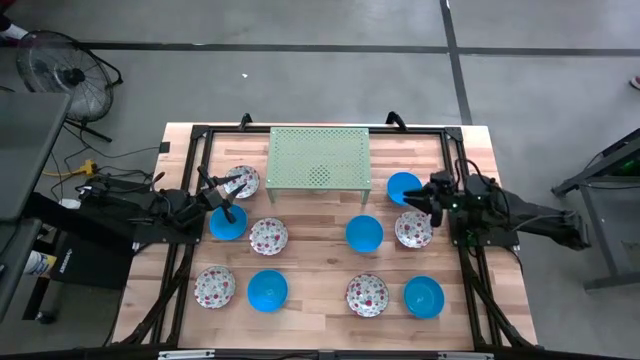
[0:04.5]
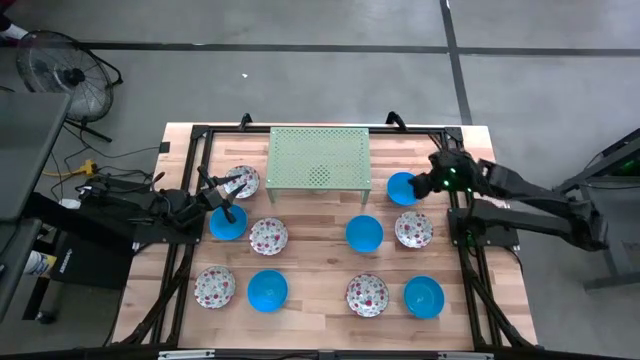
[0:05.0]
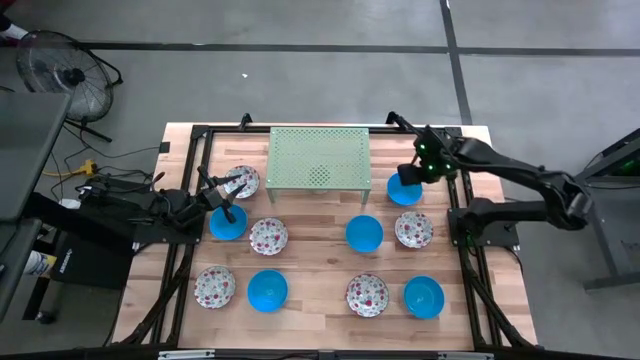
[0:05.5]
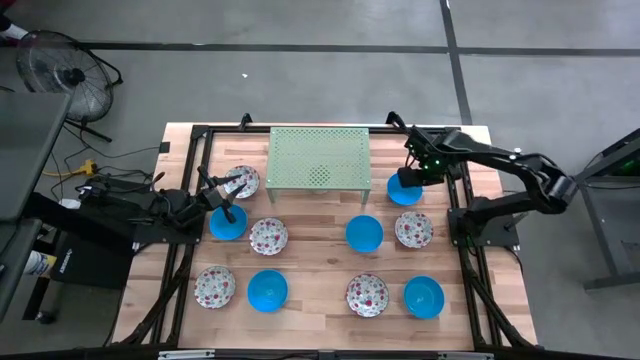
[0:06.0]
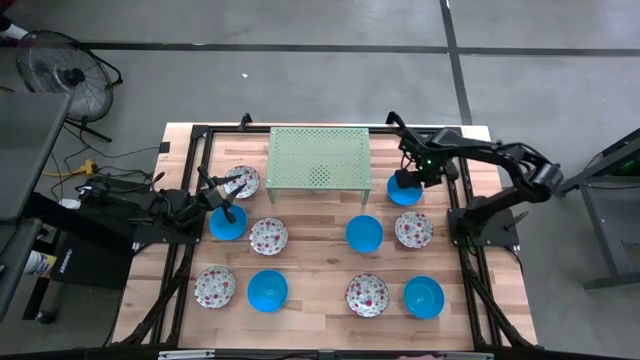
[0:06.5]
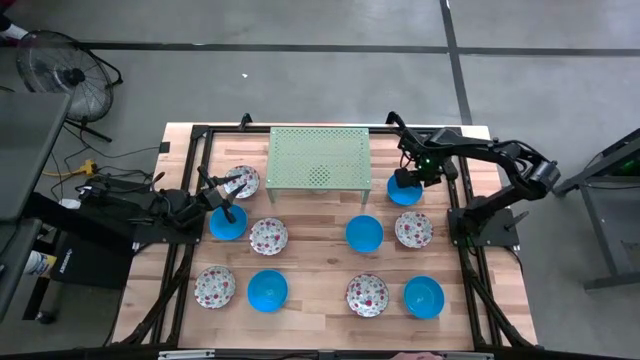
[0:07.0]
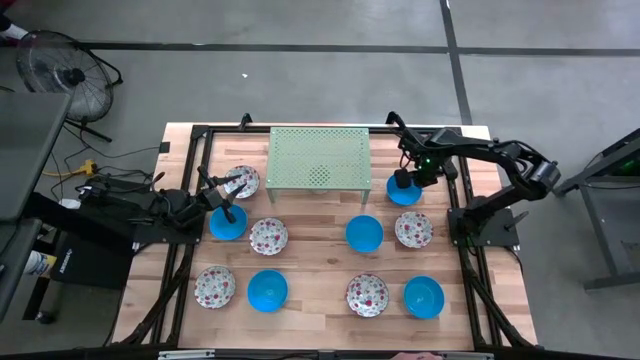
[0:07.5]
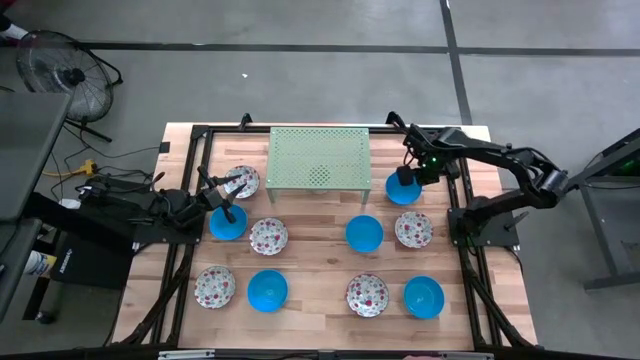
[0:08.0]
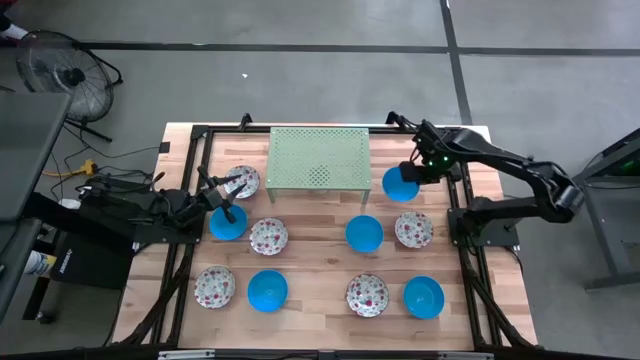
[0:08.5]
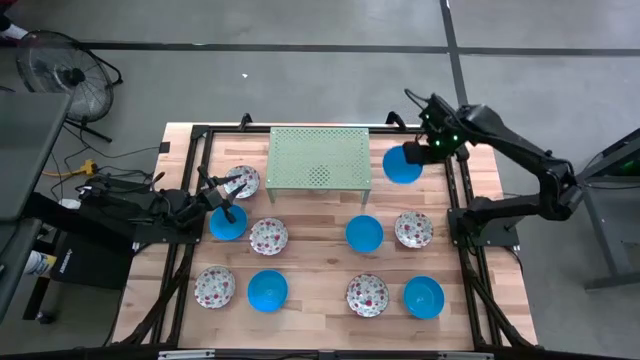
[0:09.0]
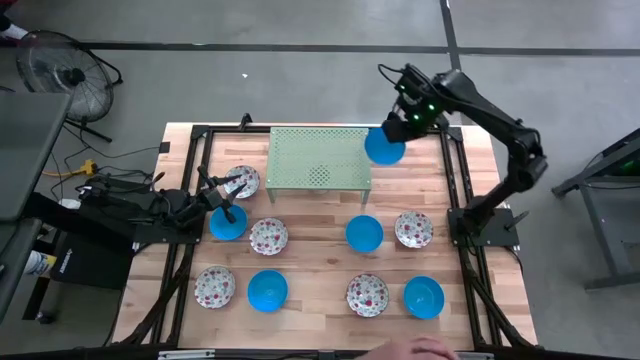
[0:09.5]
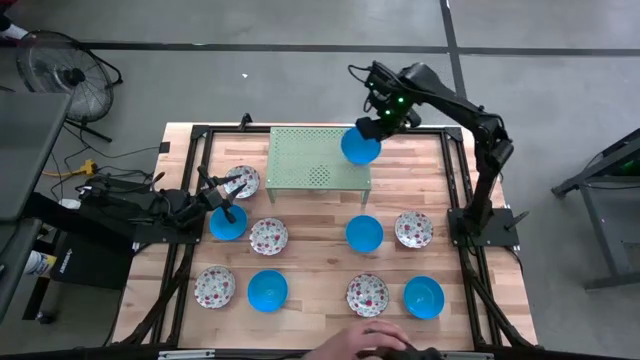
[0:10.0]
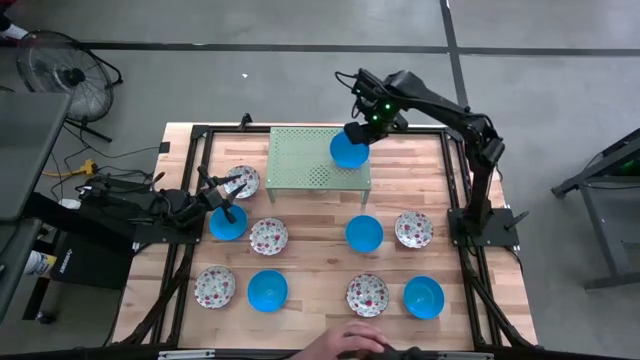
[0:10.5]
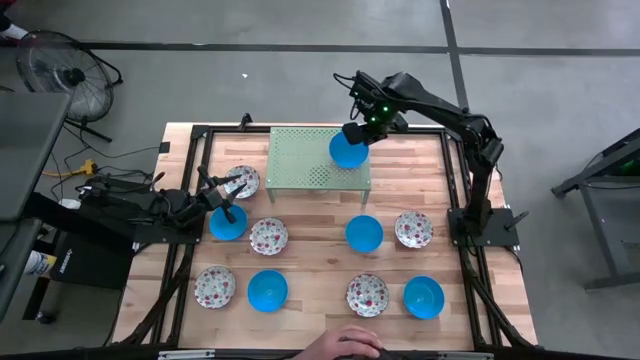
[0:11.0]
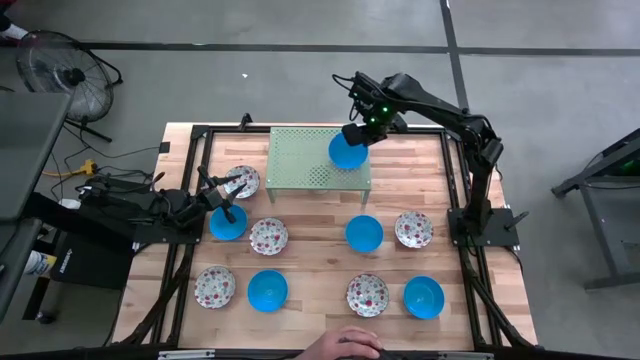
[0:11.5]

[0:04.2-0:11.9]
Task: Pick & Place Mini bowls
Put the blue bowl on the shelf

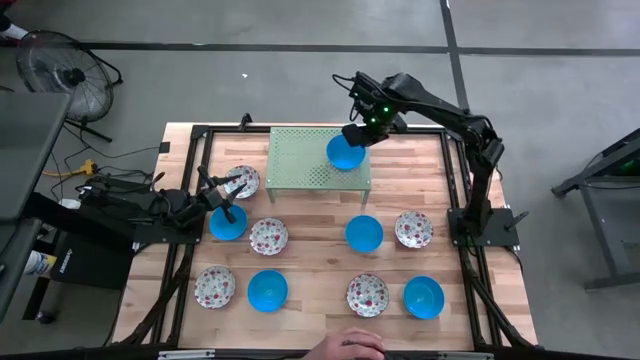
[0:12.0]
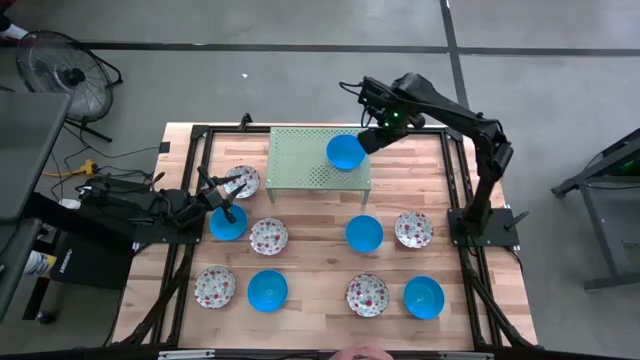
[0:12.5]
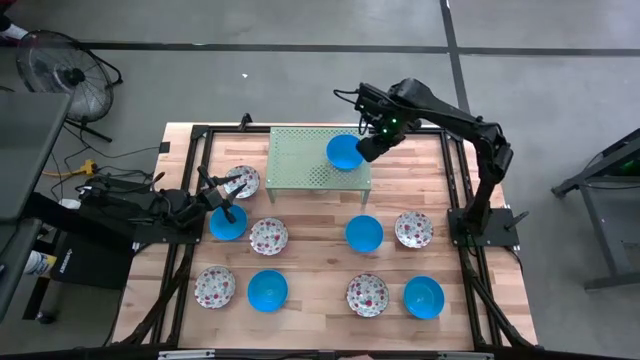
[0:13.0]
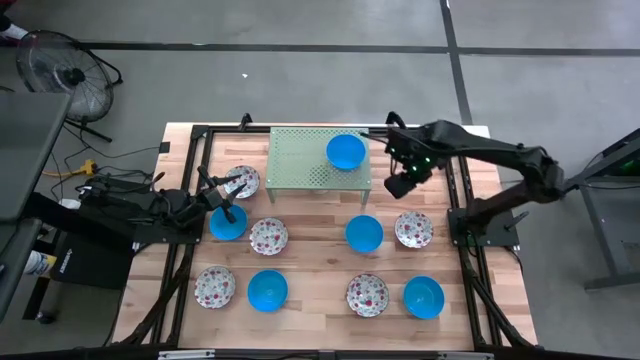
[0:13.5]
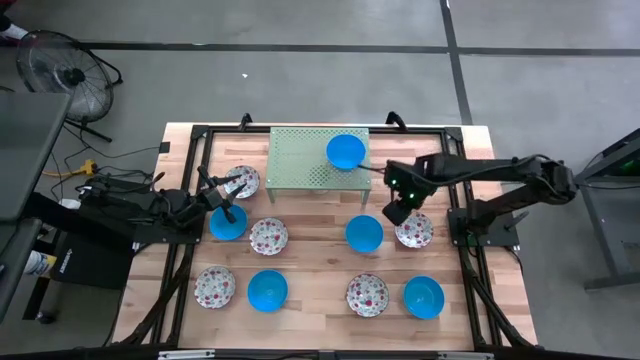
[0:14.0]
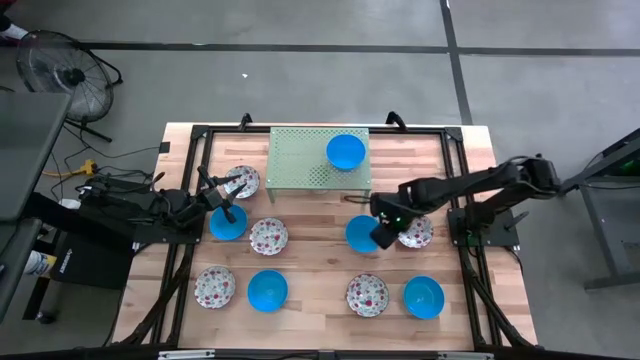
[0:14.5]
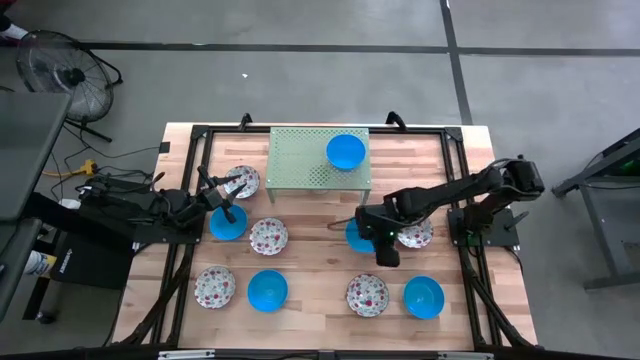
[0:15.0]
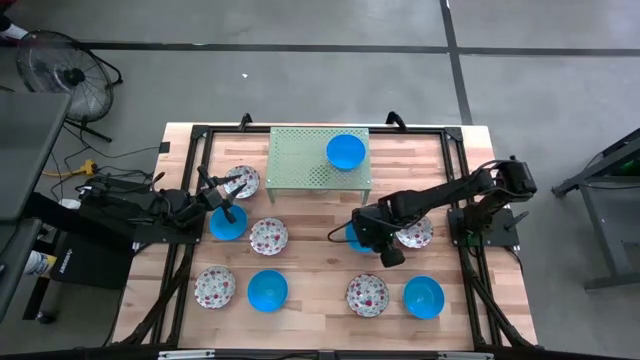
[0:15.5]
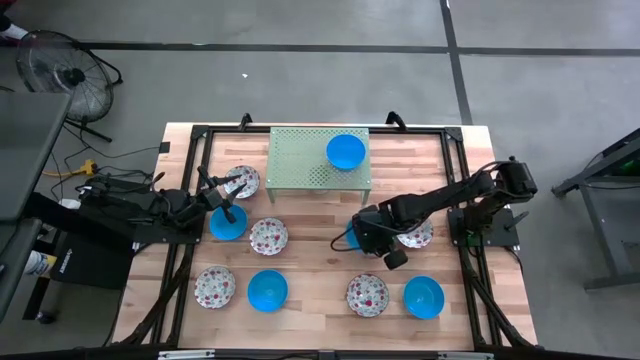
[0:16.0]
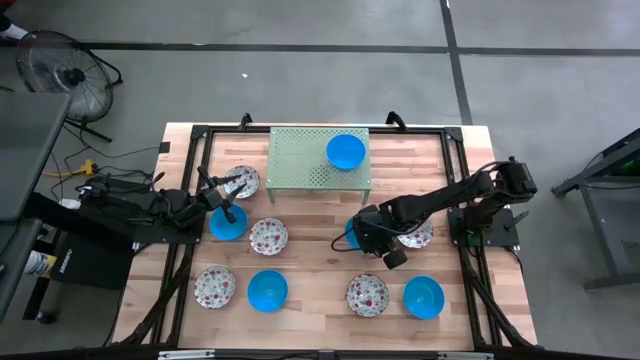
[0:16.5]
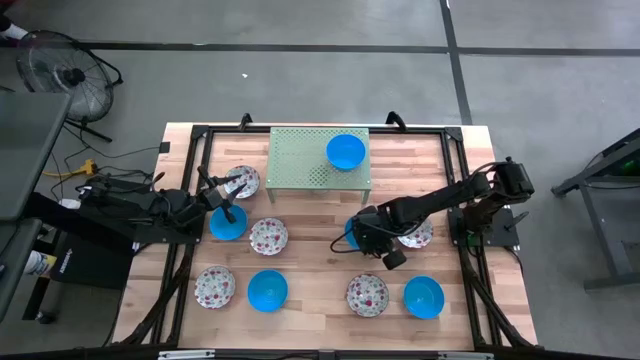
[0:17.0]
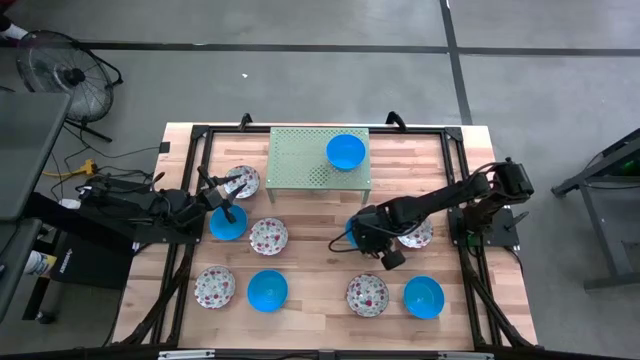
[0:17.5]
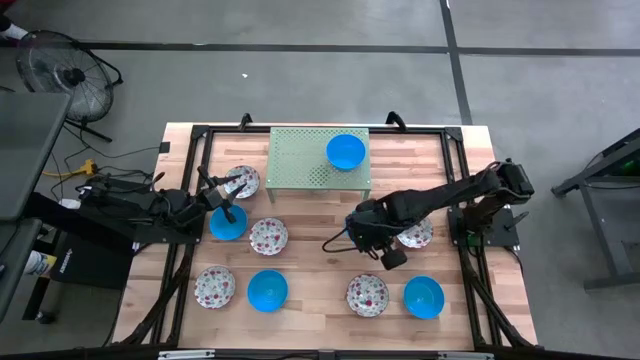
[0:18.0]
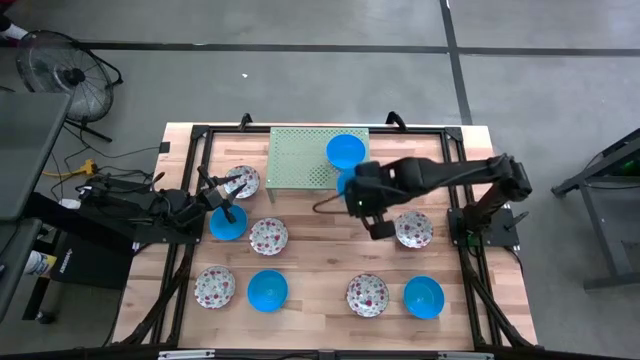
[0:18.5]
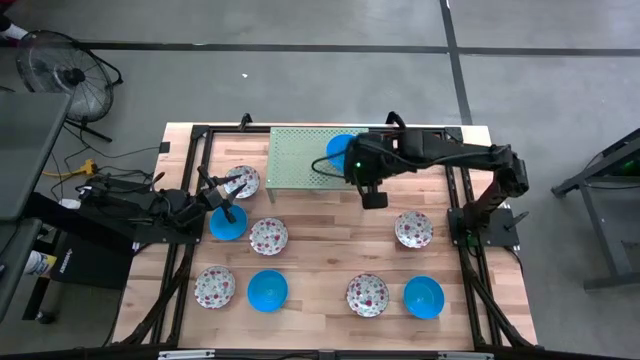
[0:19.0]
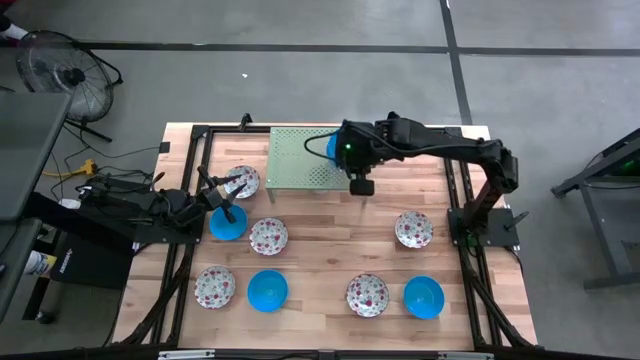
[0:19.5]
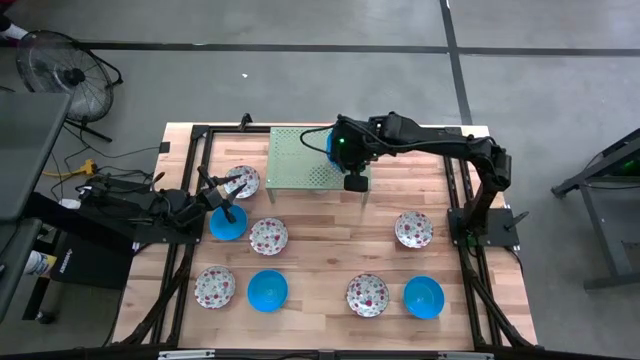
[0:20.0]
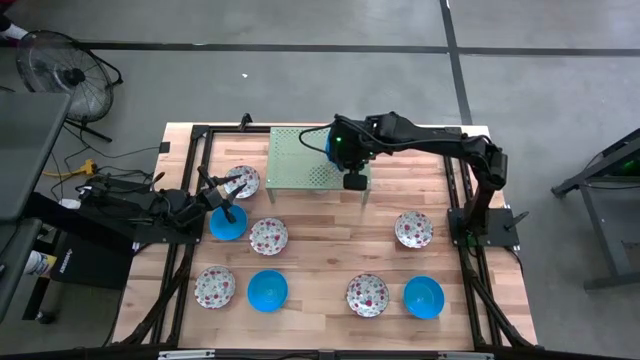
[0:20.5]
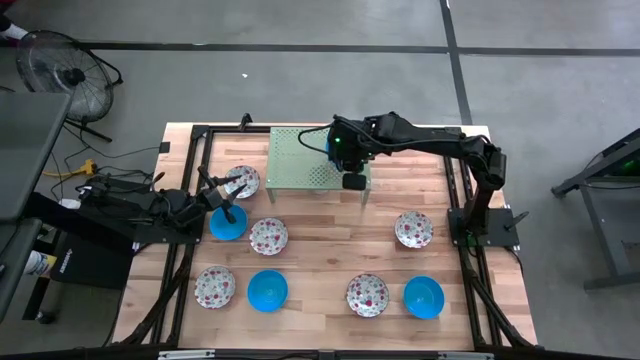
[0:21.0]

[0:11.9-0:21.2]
Stack the blue bowl on the blue bowl on the shelf

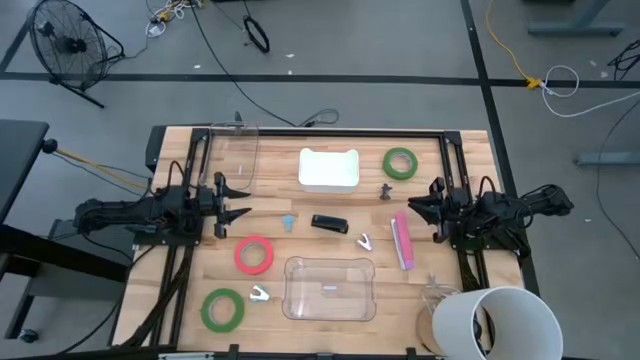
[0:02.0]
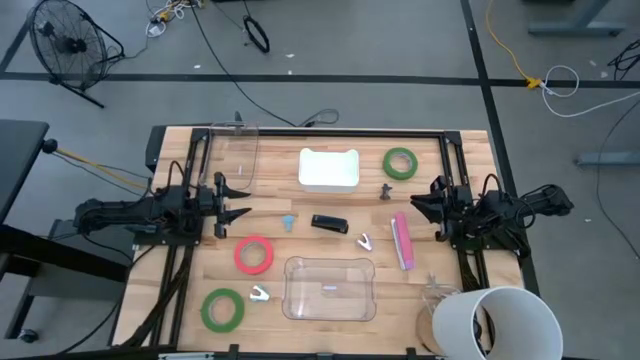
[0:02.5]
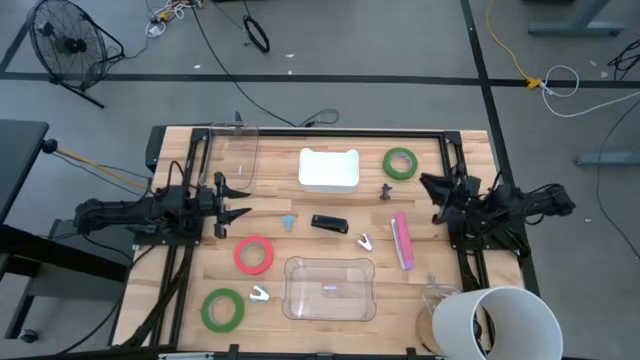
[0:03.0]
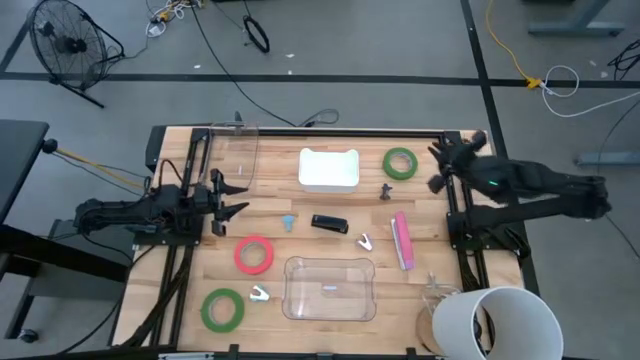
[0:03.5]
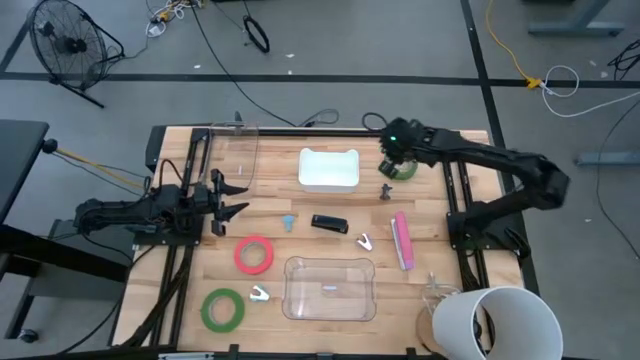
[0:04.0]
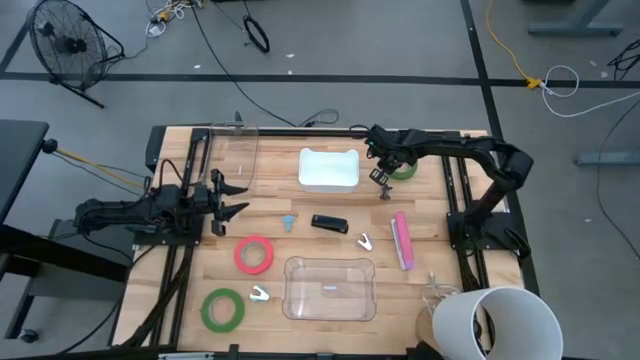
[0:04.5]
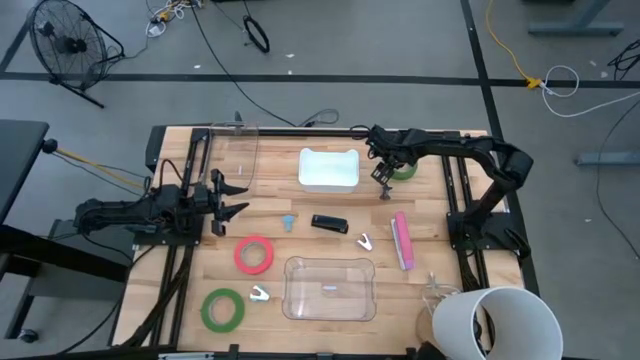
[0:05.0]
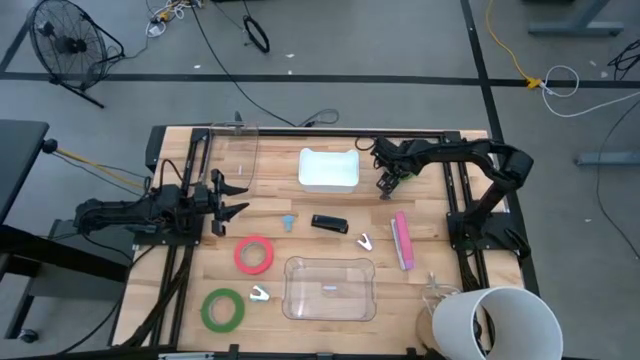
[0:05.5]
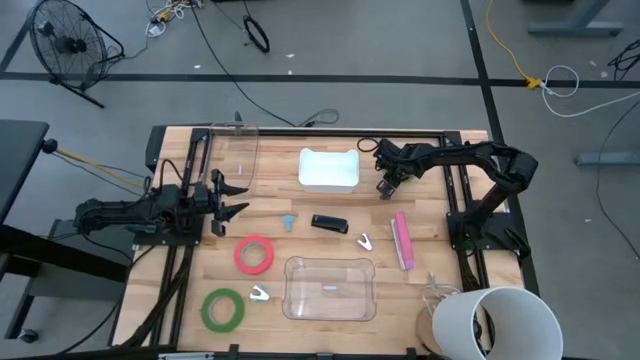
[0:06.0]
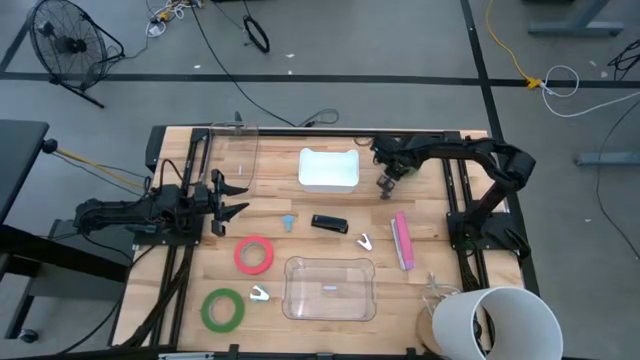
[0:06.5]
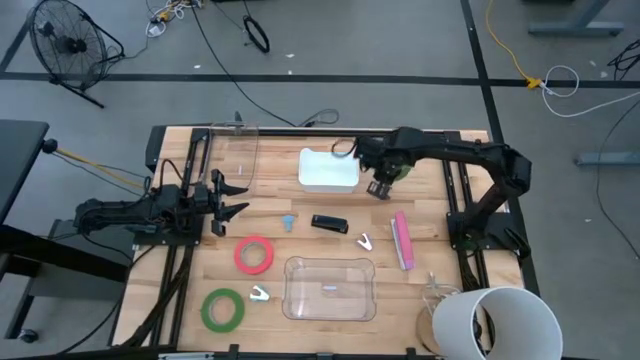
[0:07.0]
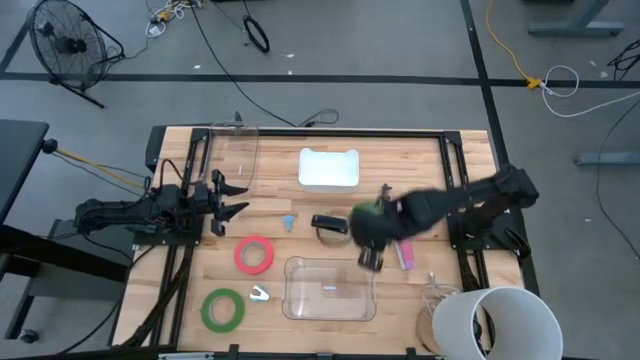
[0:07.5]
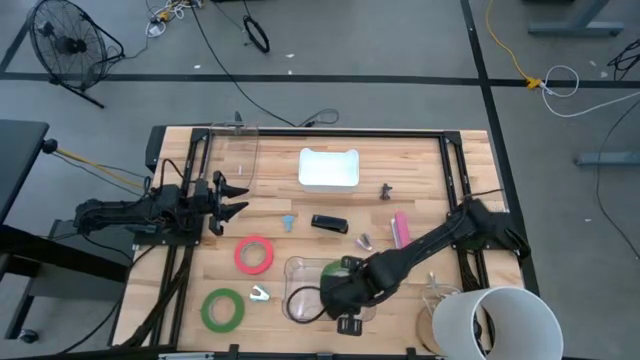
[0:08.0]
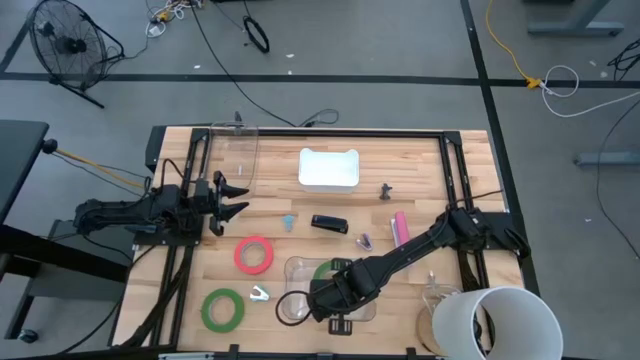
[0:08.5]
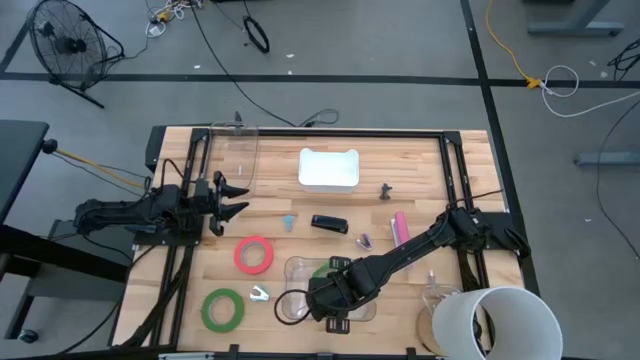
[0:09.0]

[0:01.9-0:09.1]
Task: Pick and place Stapler, Stapler remover, tape
Put the top green tape into the bottom transparent bin
